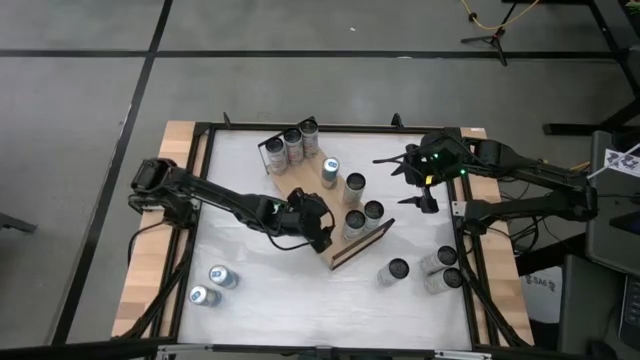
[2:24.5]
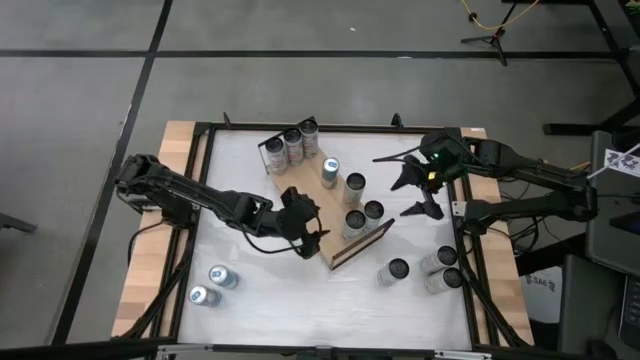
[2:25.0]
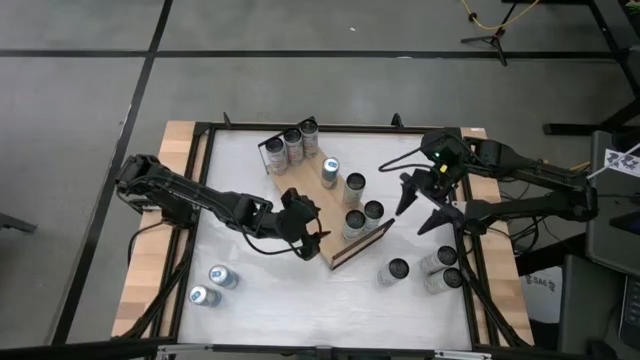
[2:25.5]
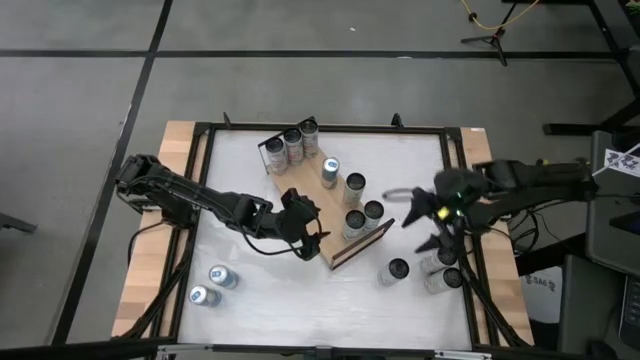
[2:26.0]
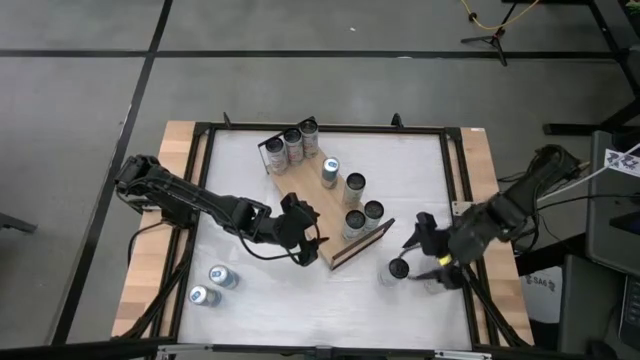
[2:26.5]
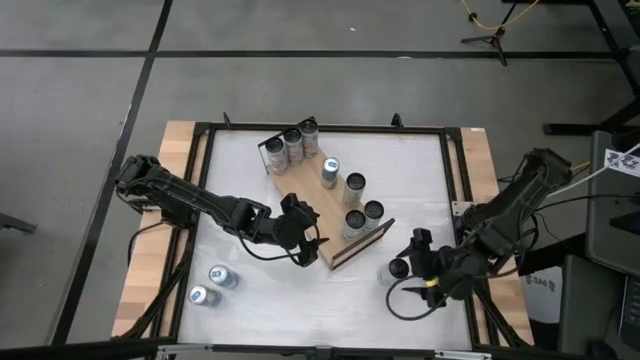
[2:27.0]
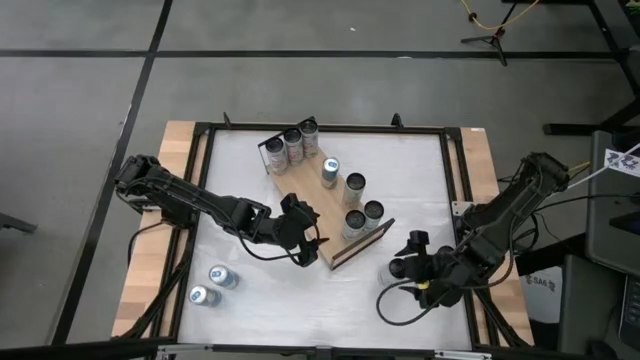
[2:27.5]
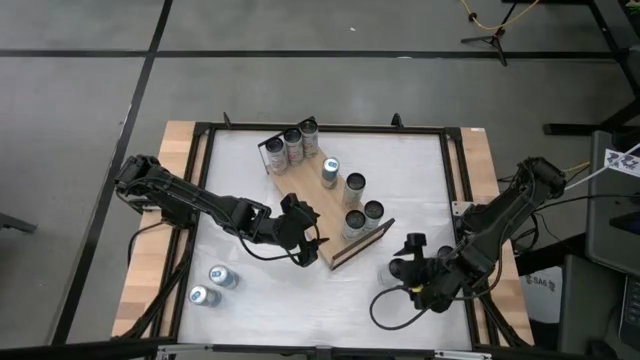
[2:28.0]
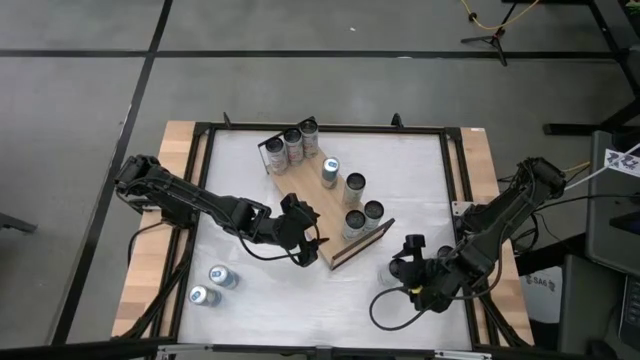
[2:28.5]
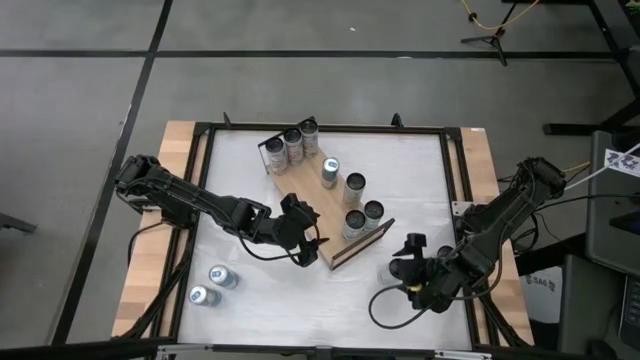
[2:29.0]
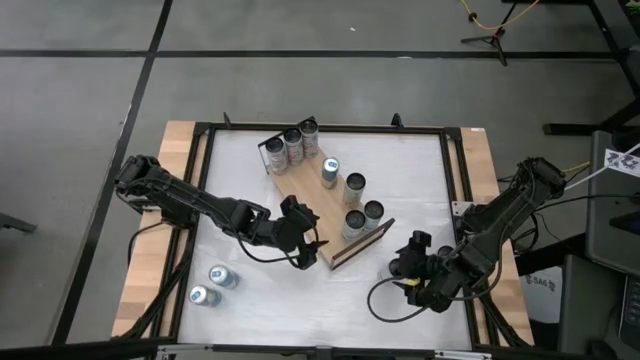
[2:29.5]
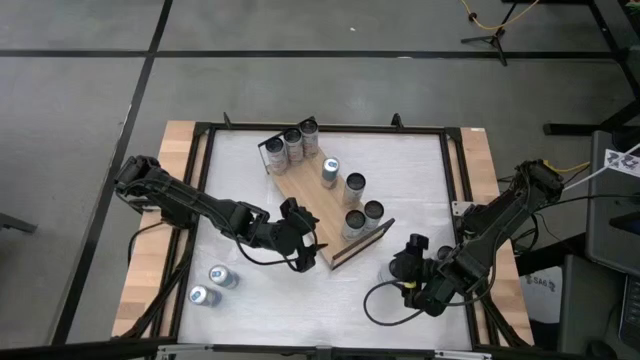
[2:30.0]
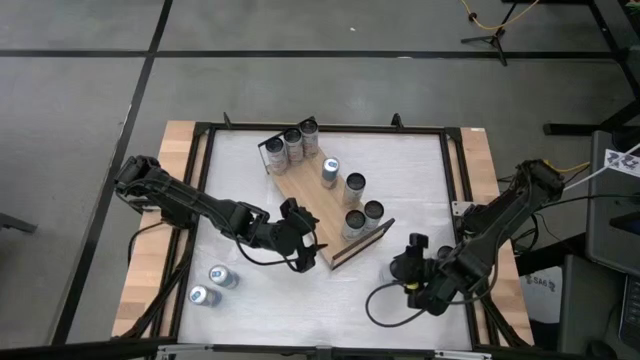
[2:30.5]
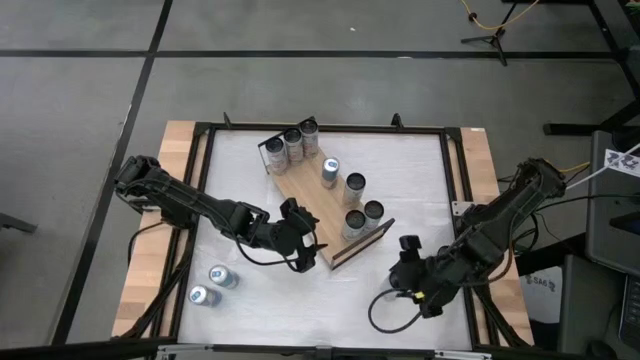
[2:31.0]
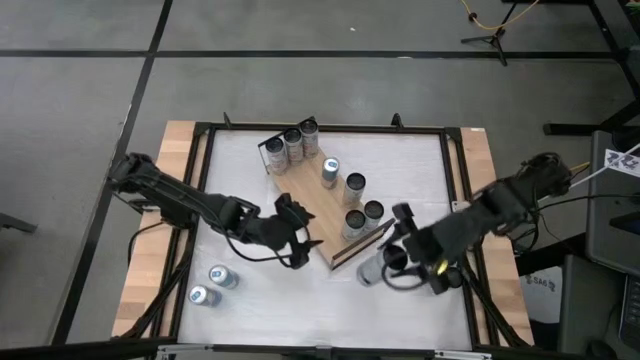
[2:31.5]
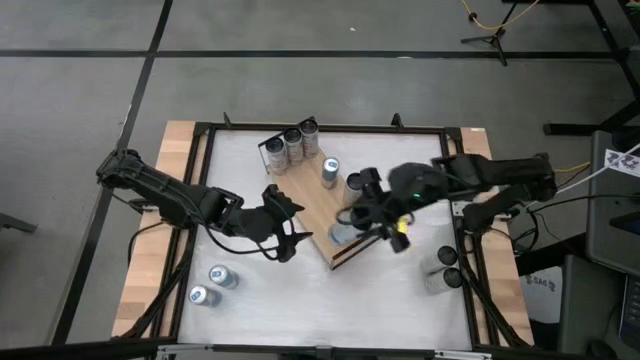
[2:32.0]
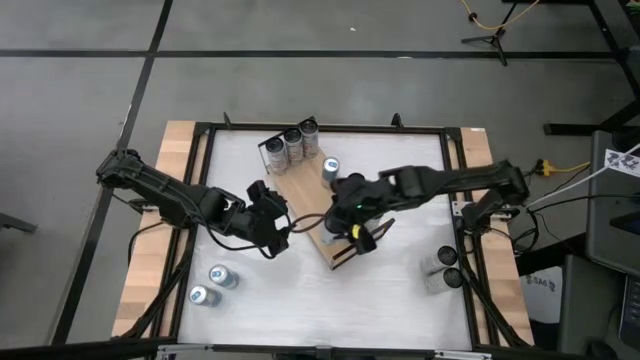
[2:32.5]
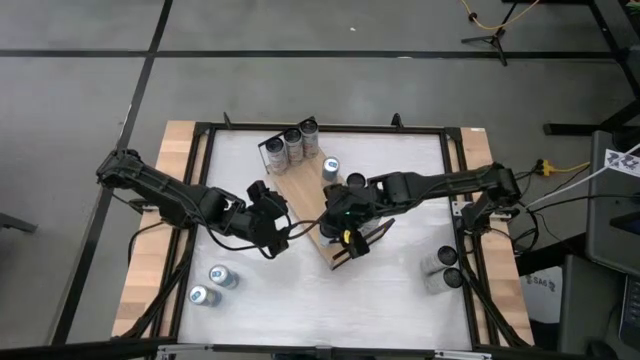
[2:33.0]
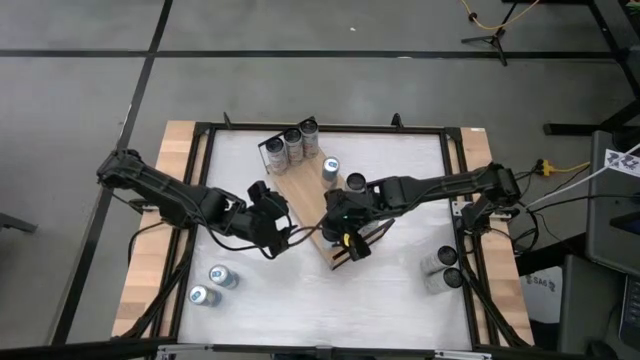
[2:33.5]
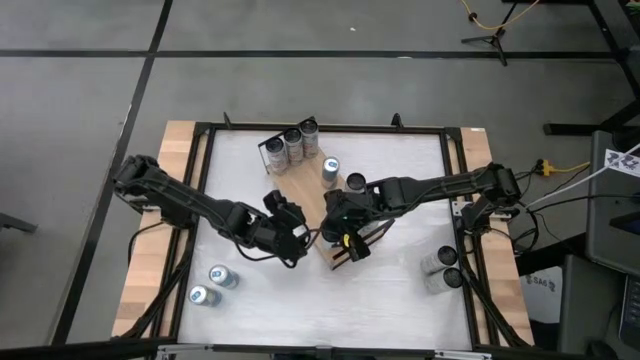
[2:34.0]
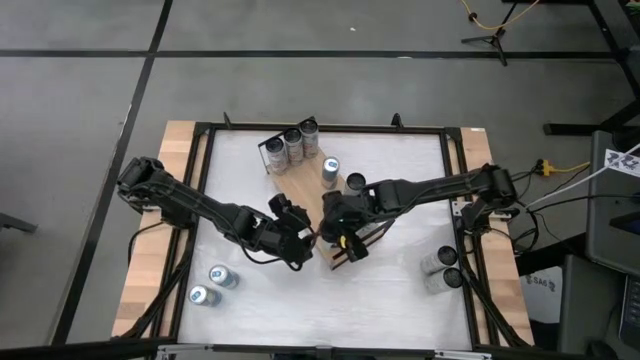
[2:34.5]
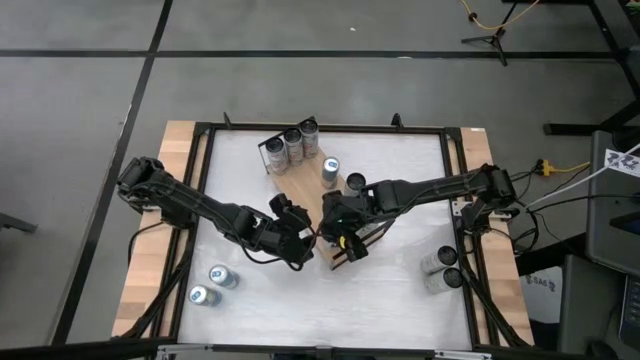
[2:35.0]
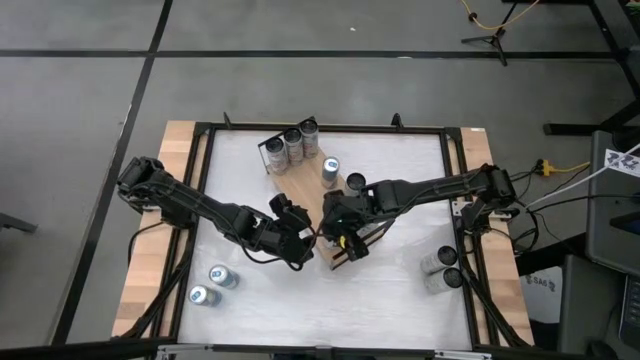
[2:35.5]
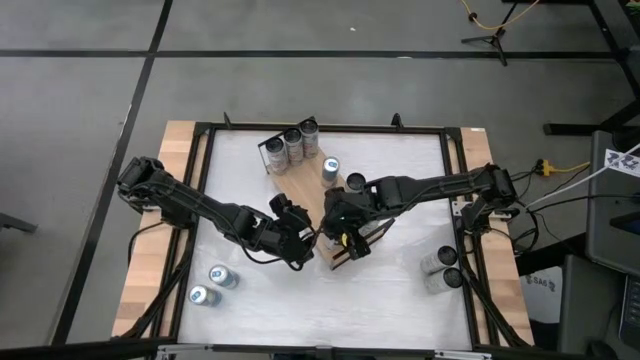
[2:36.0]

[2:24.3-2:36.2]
Task: Place canned beverage on shelf
Put the white and blue soda can on the shelf and align with the other white and blue soda can

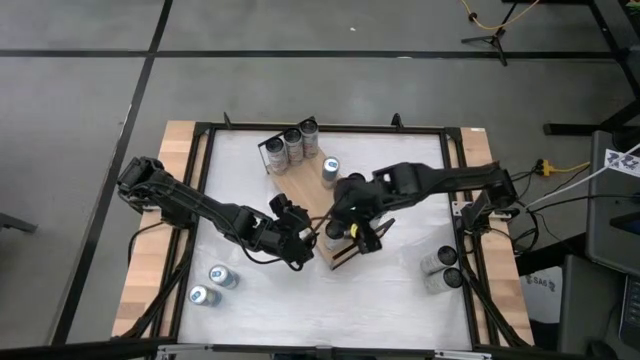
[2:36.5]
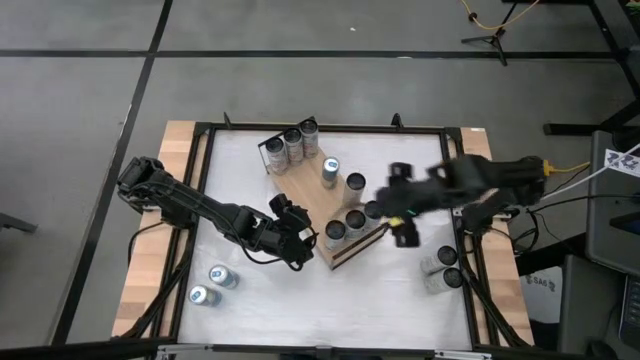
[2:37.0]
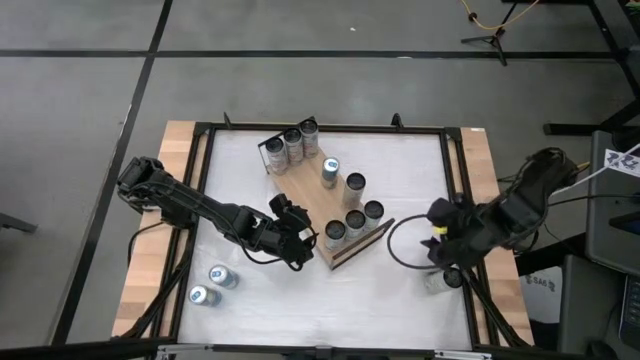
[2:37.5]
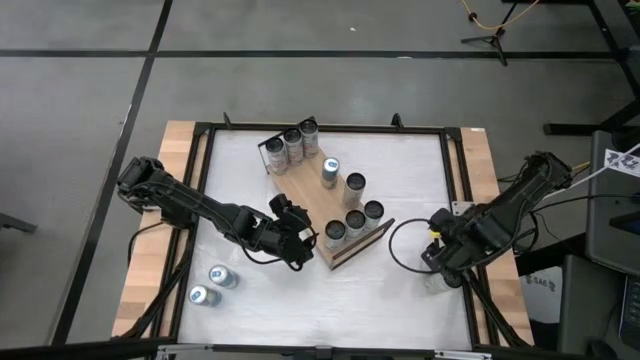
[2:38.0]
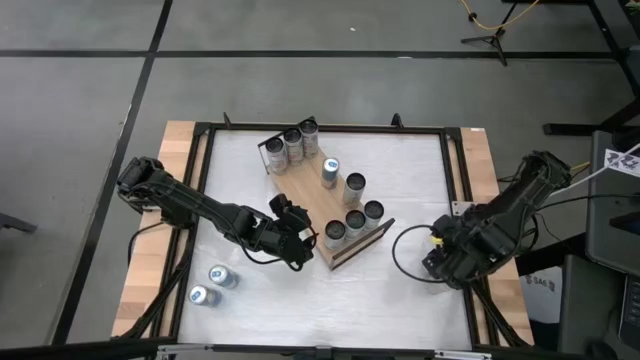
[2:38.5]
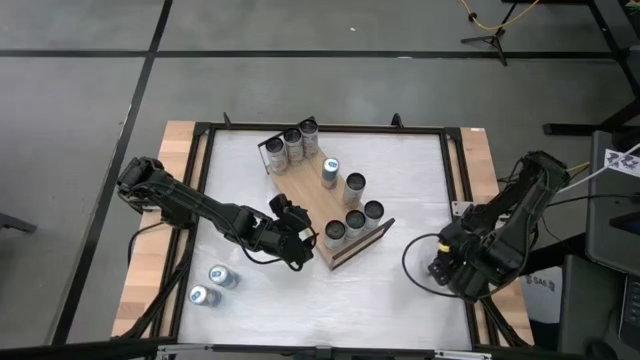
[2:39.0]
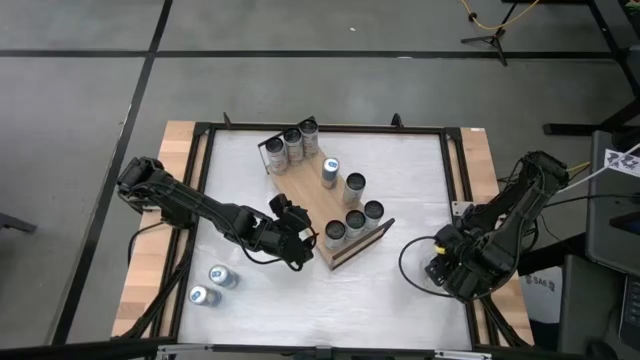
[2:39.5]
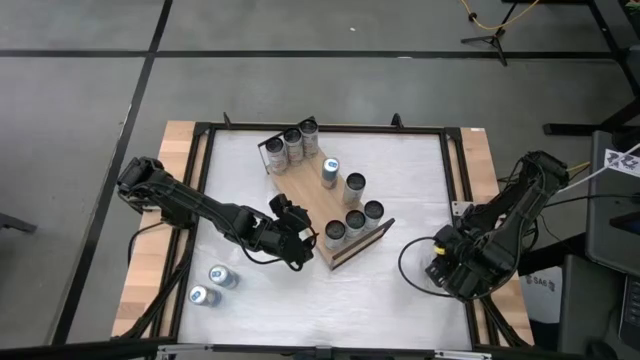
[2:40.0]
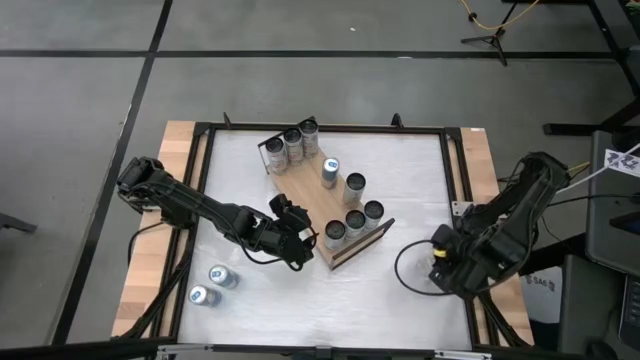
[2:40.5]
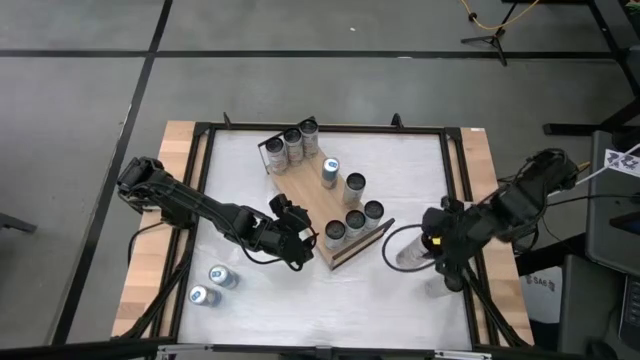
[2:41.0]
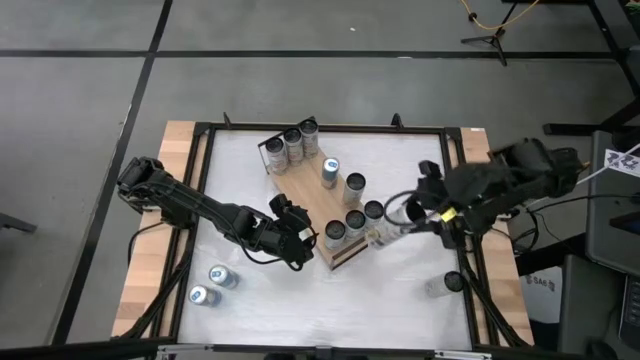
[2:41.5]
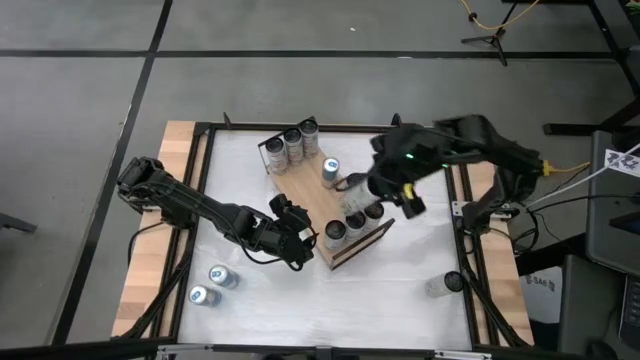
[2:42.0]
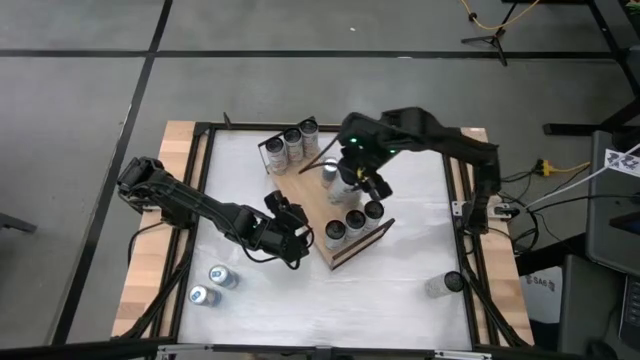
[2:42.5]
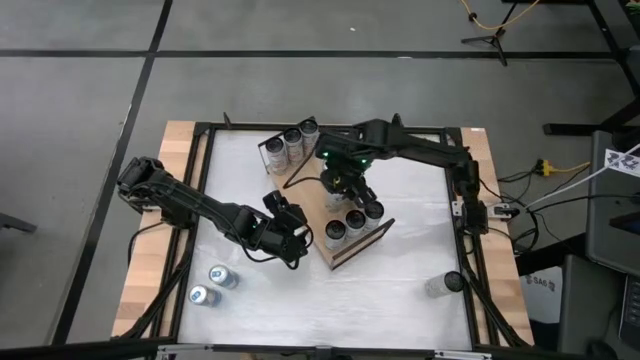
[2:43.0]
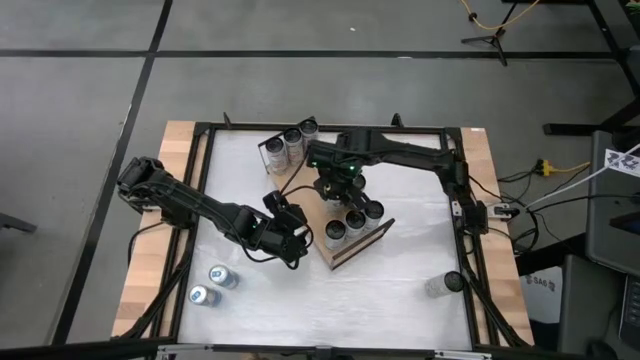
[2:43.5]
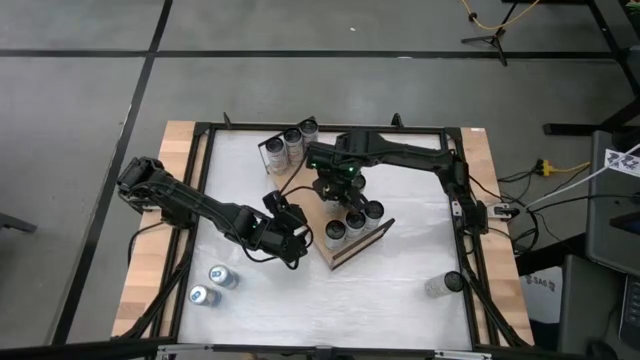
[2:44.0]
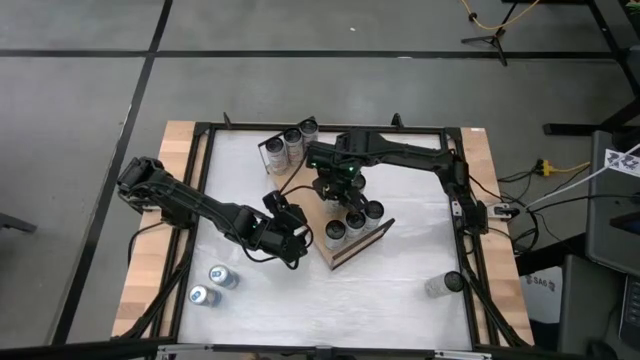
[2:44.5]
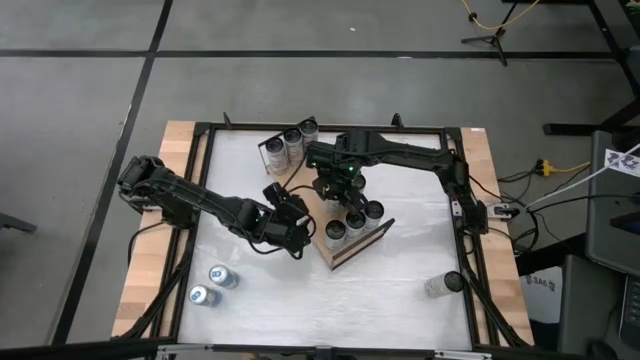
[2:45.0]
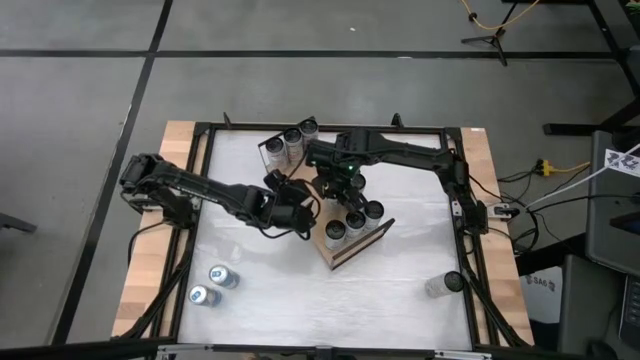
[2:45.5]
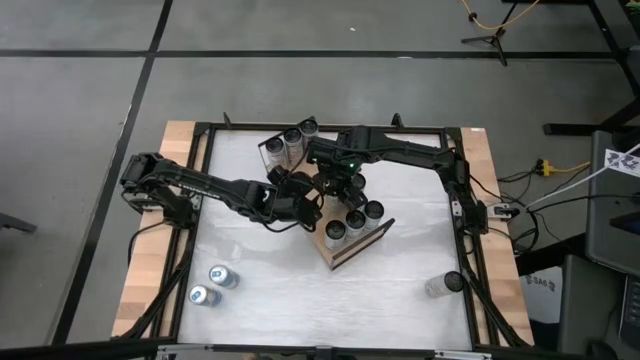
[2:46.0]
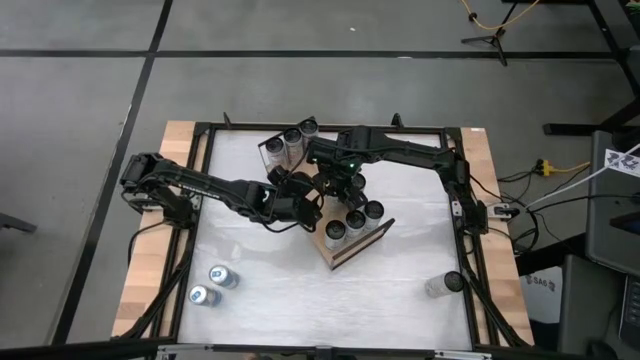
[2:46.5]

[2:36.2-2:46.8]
Put the right white-orange soda can on the shelf and align with the other white-orange soda can
